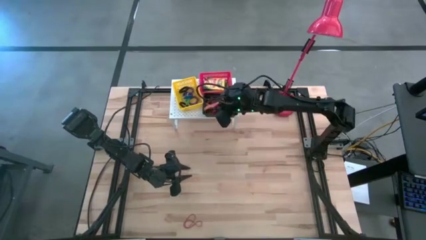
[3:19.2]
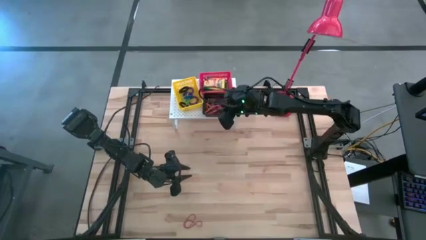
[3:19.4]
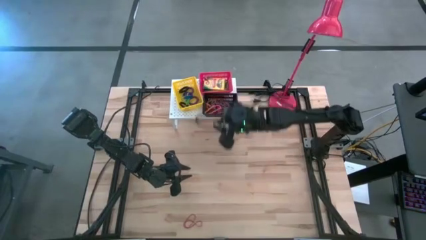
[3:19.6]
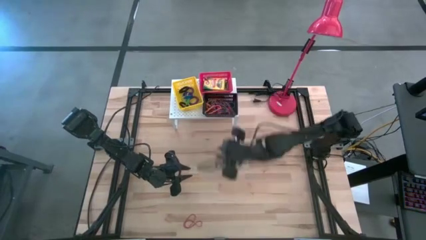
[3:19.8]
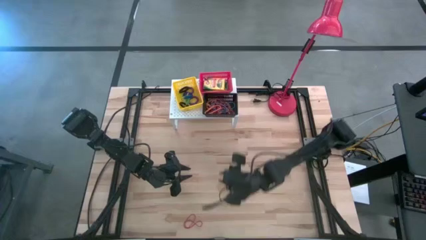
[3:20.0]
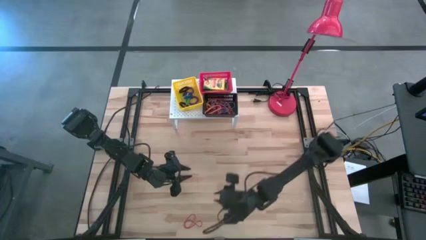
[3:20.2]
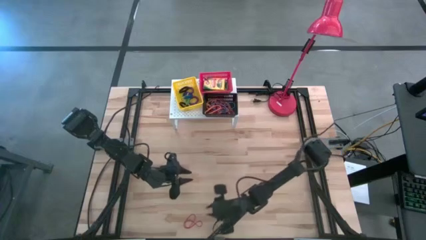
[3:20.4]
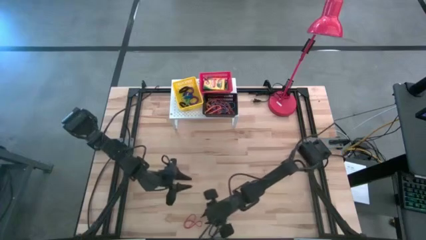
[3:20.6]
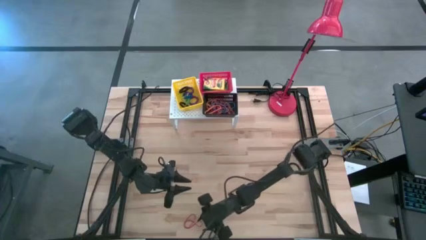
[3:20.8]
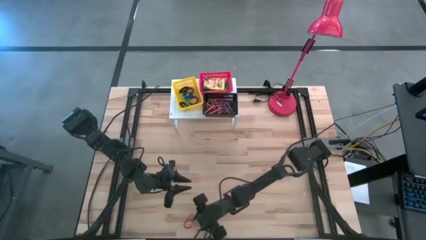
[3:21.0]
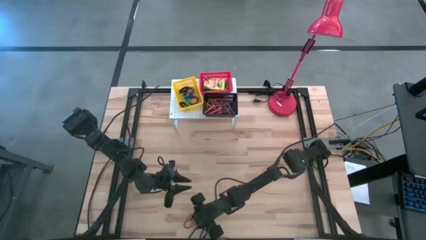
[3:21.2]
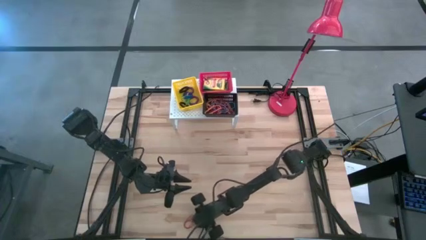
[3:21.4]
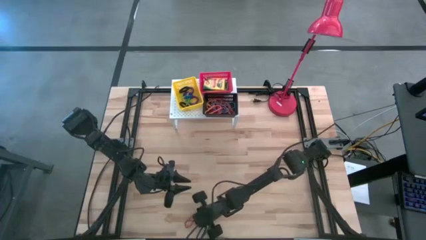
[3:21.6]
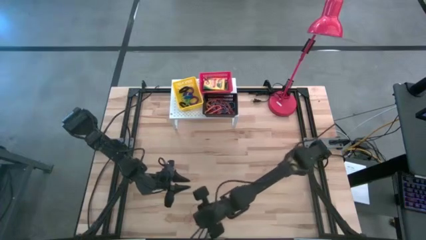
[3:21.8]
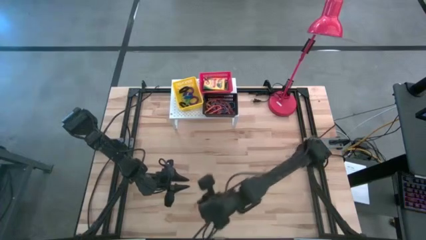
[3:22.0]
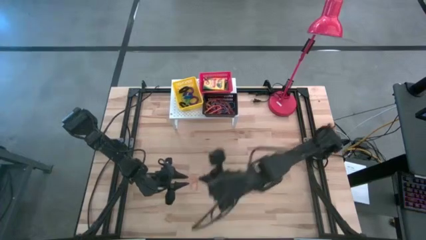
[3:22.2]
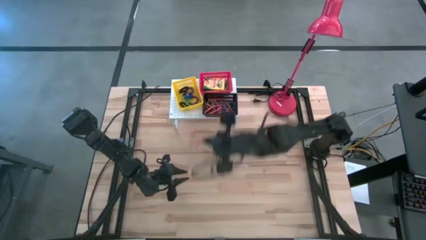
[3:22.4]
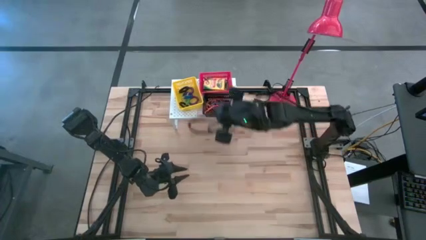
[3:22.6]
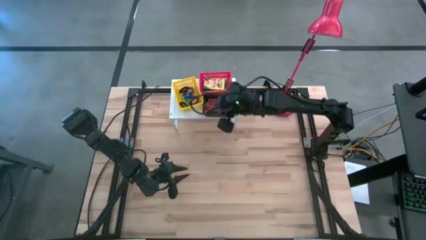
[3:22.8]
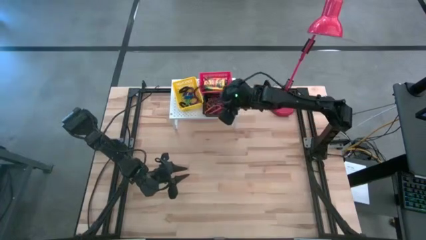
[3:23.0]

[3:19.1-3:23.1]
Task: Pick & Place Office Desk Supplies
Put the red rubber band into the black bin on the shelf

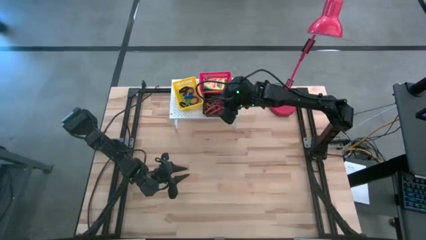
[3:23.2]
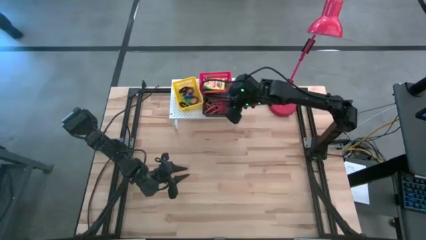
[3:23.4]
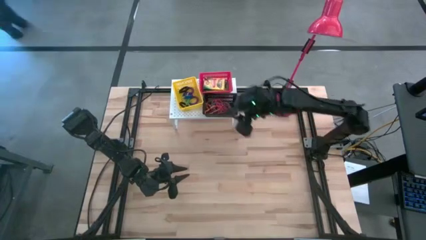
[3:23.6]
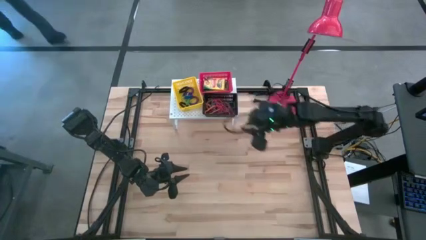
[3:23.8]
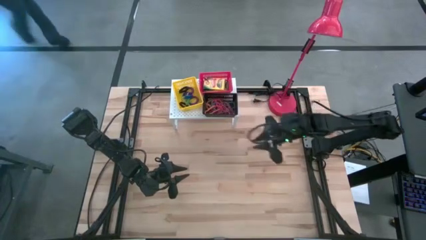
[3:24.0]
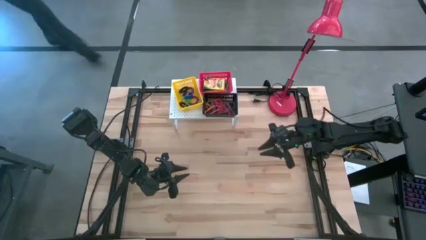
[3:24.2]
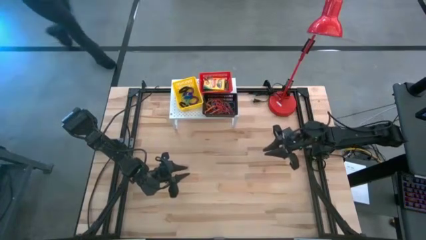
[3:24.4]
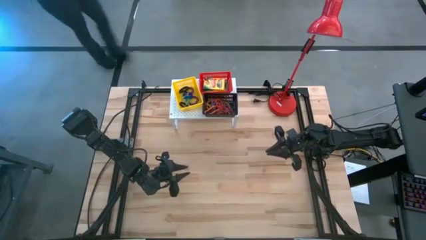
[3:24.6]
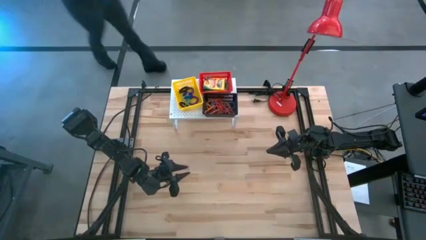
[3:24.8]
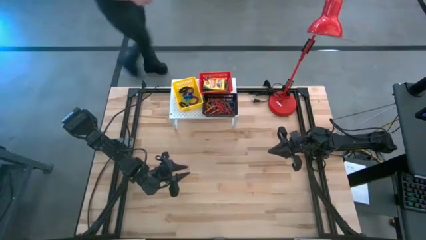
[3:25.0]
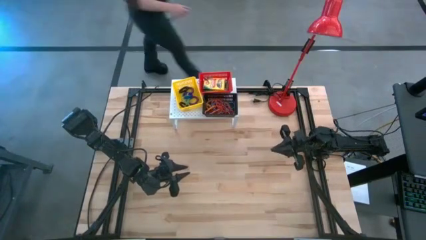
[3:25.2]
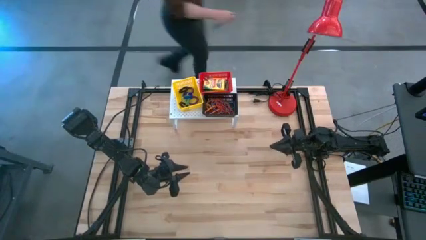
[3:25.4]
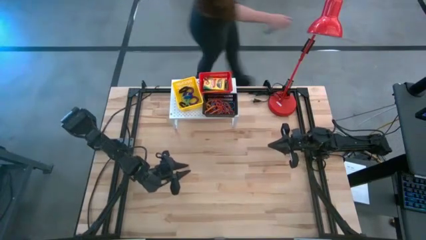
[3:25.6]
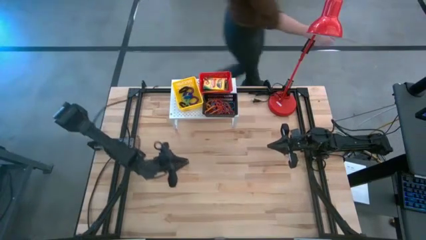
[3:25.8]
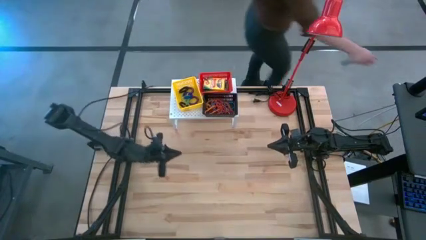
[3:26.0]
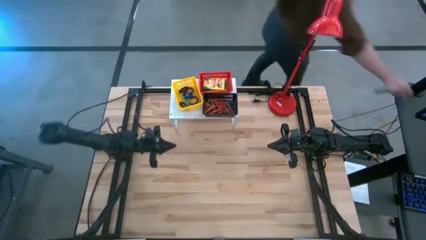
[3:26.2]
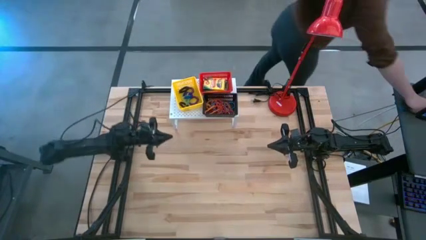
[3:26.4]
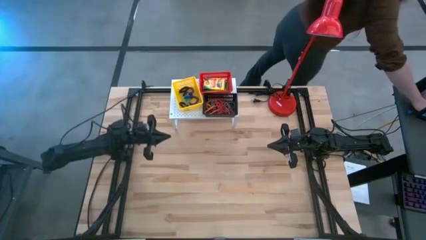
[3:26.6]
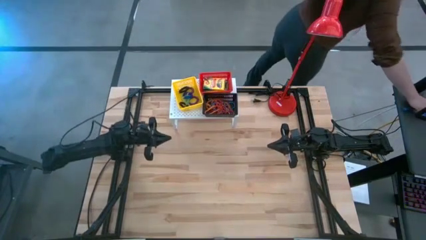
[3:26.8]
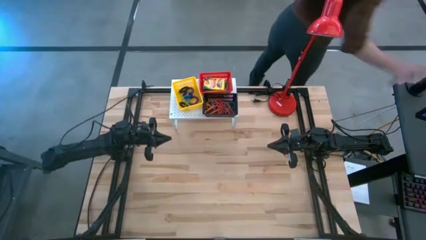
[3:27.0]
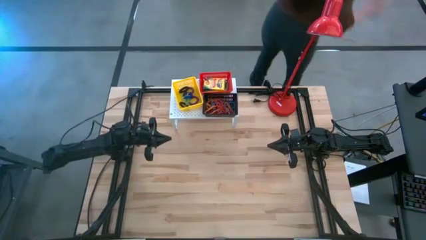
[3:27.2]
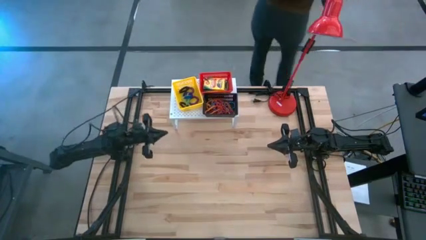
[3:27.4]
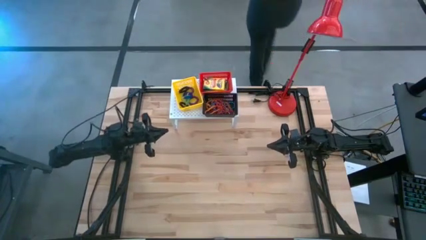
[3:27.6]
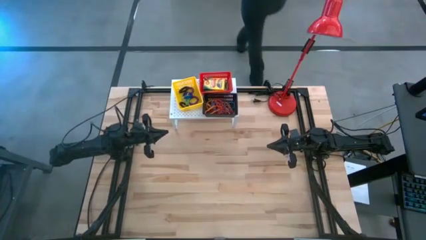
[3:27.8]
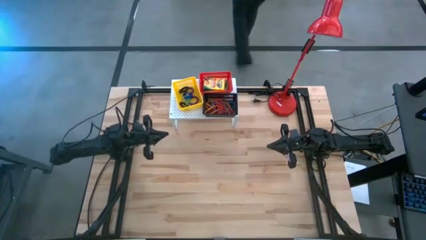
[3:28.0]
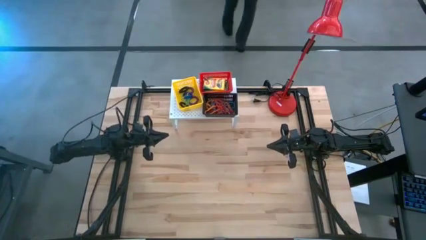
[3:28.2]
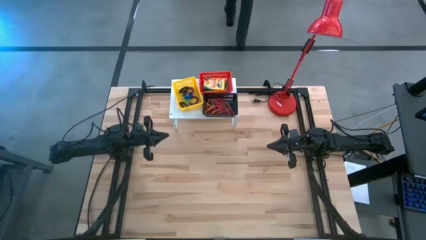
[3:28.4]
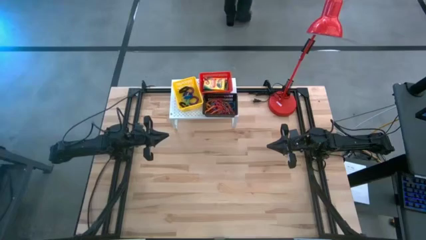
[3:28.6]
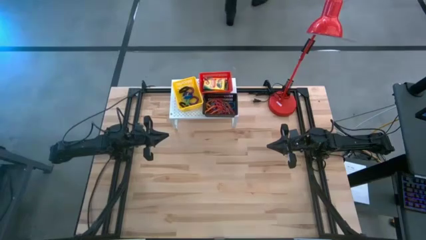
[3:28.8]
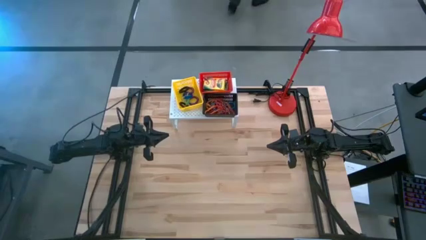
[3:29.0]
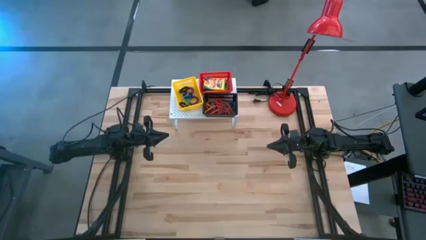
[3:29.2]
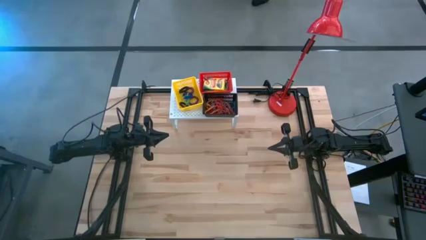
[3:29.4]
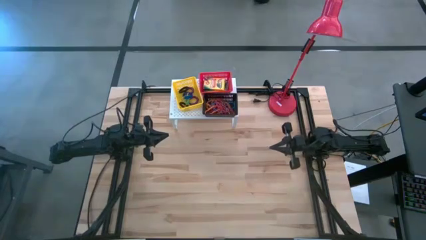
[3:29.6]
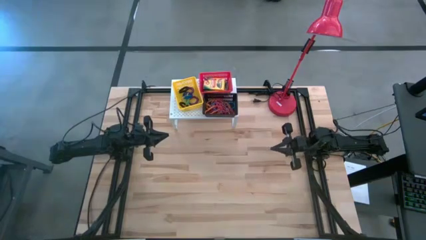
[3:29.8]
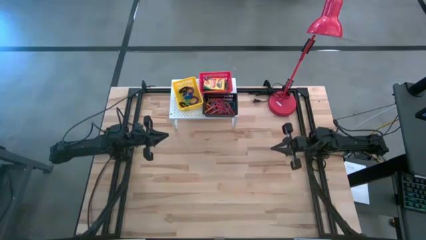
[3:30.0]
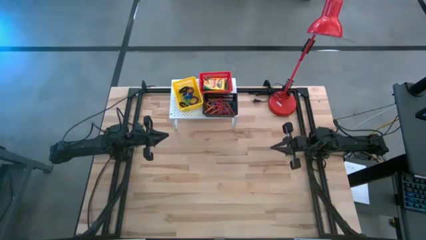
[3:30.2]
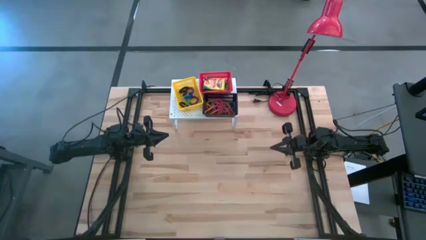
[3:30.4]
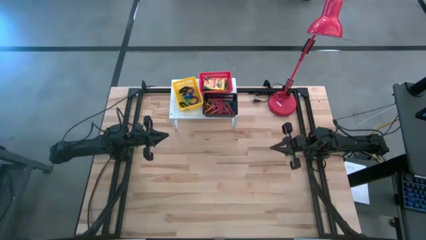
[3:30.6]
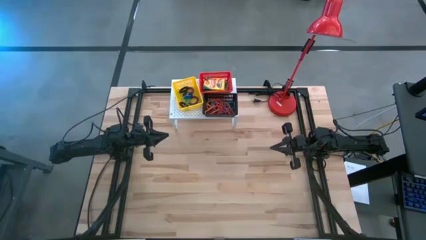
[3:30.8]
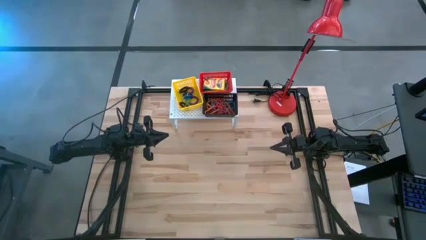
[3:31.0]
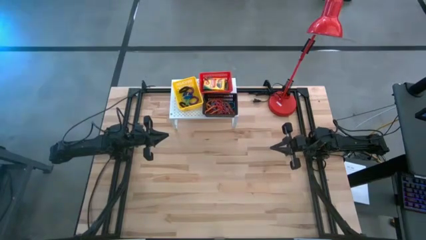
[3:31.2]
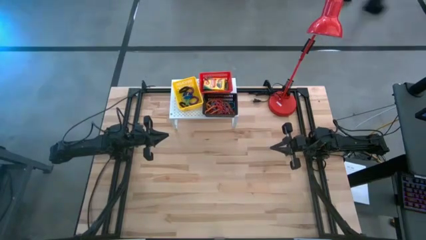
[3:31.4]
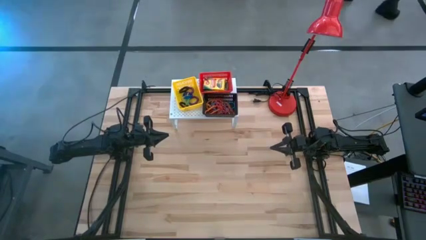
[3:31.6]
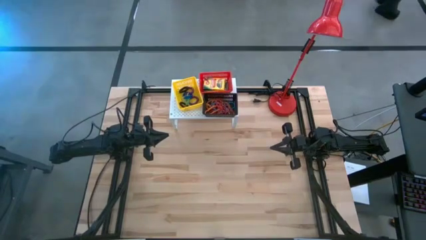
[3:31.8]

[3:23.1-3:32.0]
Return to Home Position

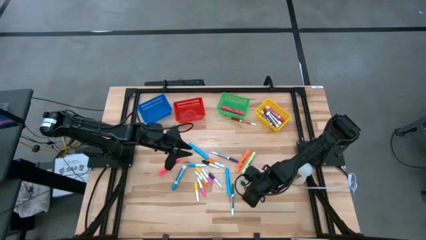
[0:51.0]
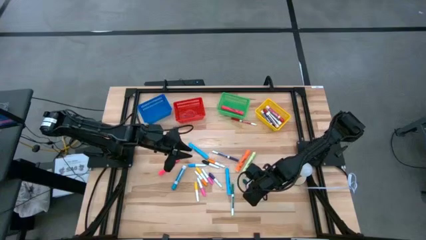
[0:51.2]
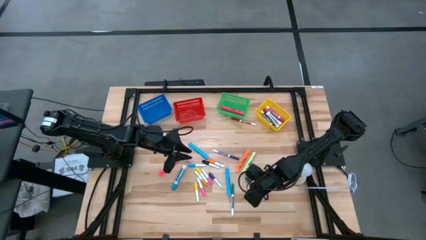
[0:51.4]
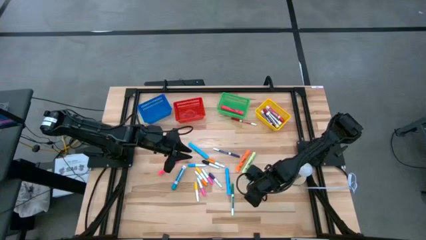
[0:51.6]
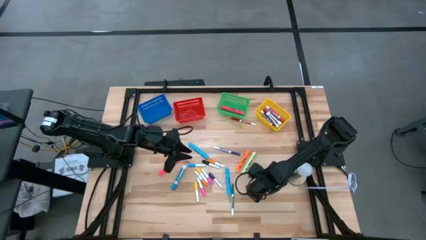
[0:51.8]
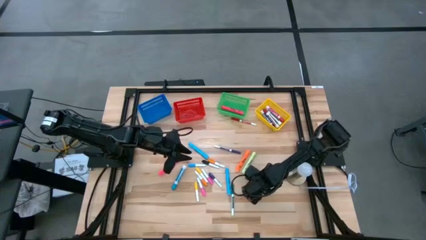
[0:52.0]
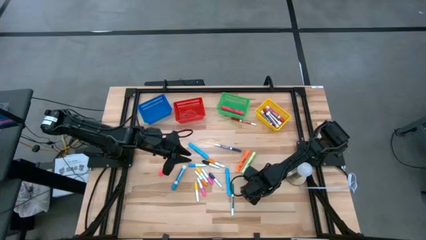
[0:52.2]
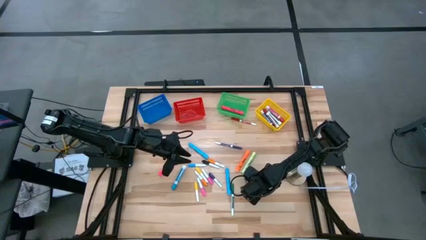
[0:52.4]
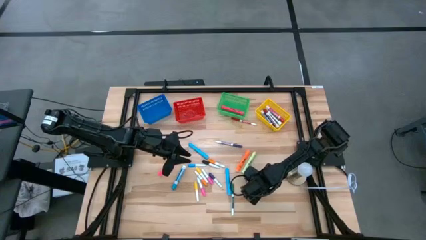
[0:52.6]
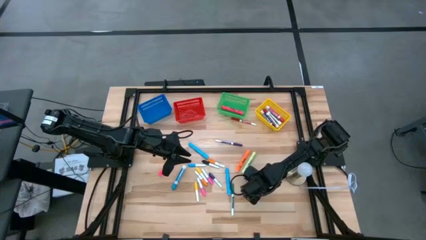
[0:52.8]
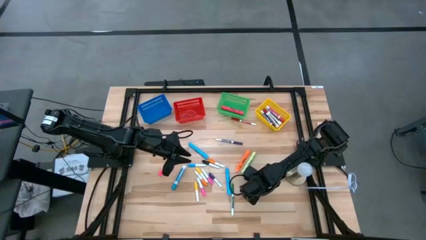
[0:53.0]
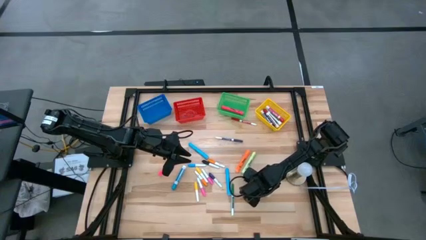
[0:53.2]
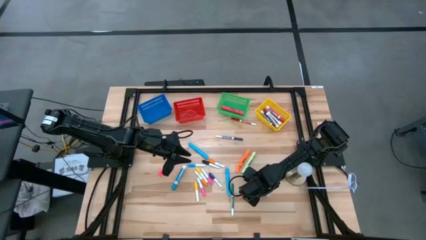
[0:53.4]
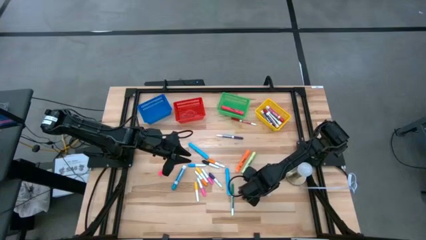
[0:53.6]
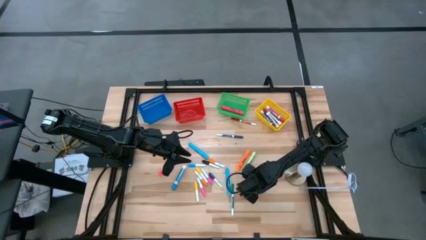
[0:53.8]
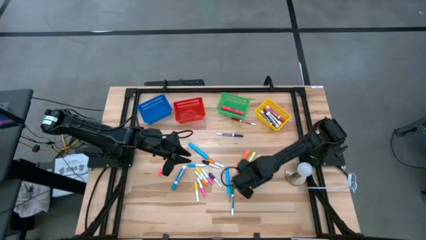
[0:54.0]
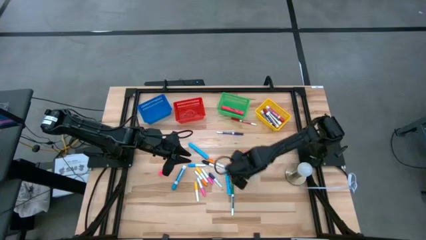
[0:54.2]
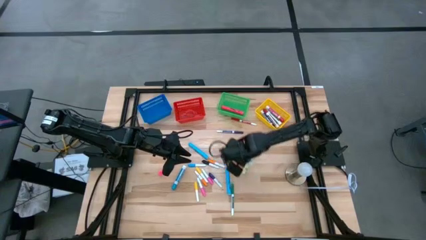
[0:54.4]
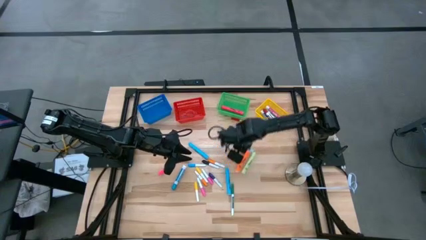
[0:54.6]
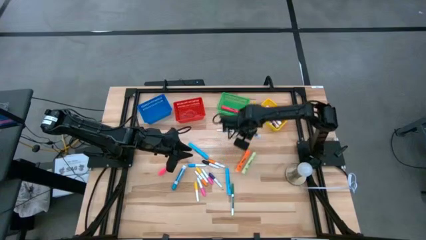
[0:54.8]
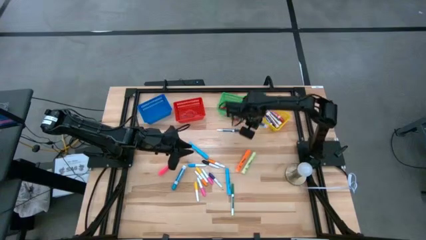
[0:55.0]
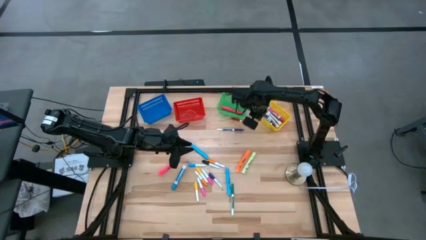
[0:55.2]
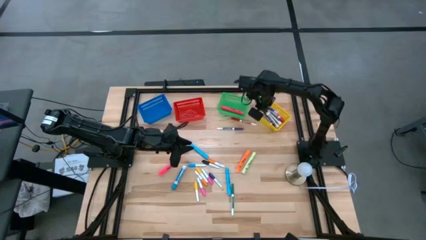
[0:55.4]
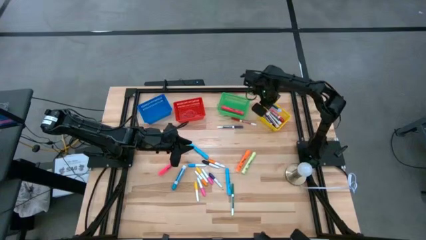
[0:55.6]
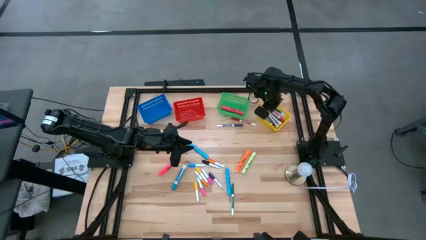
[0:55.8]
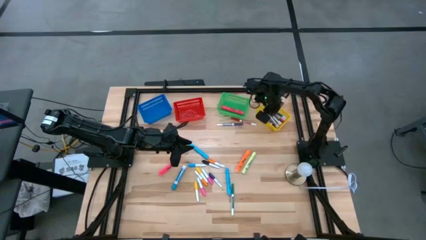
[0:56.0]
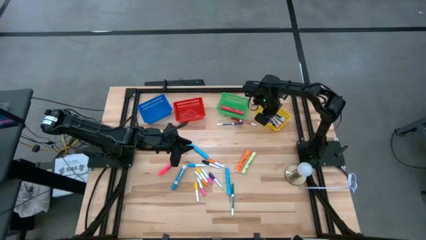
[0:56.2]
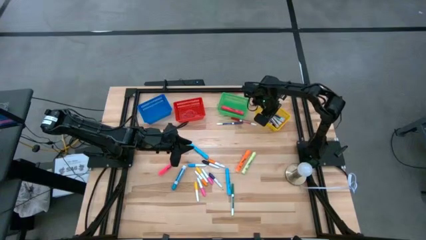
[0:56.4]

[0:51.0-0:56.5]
Task: Pick & Place Markers
Put the large green marker pen into the yellow bin
